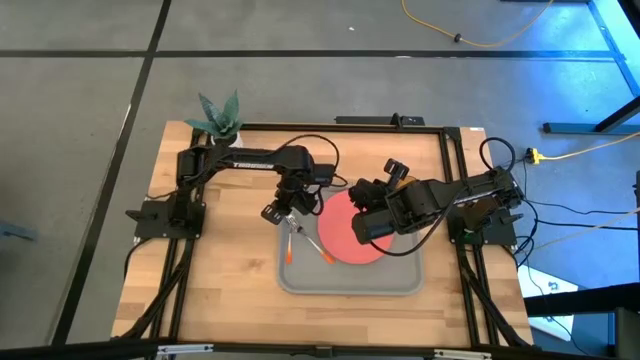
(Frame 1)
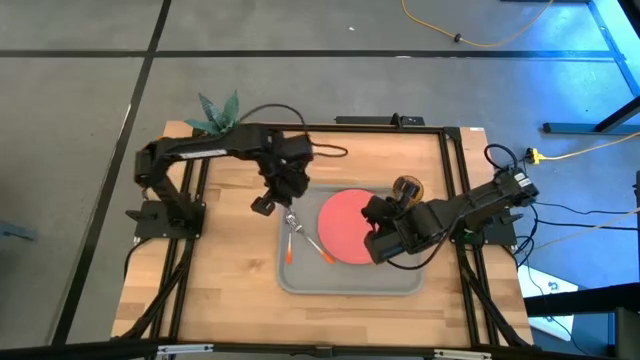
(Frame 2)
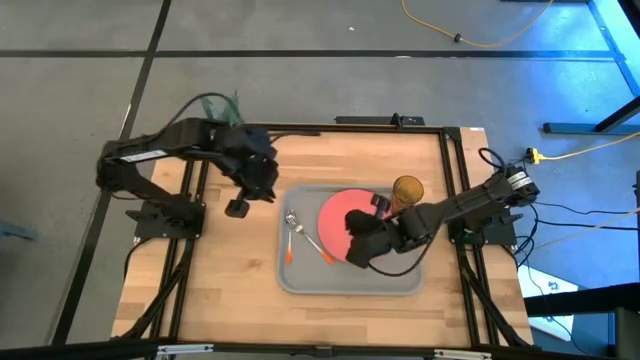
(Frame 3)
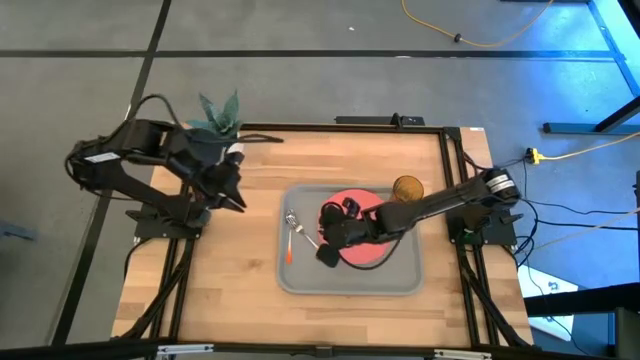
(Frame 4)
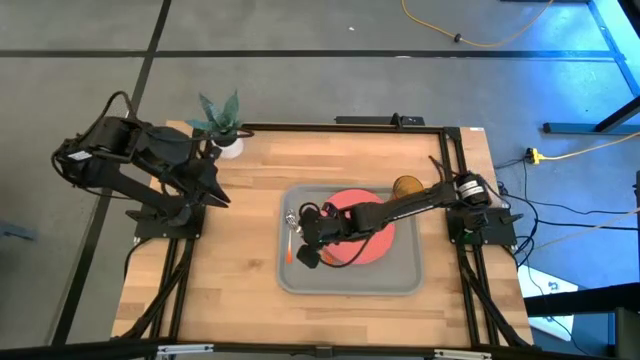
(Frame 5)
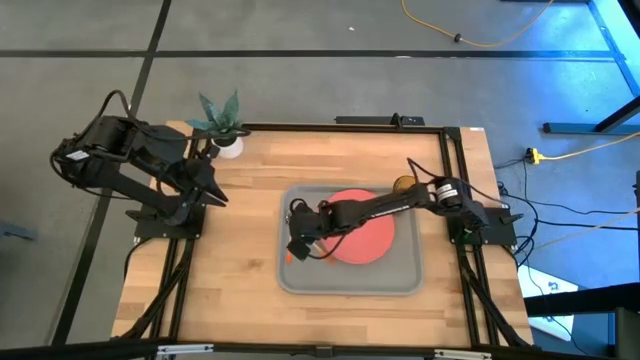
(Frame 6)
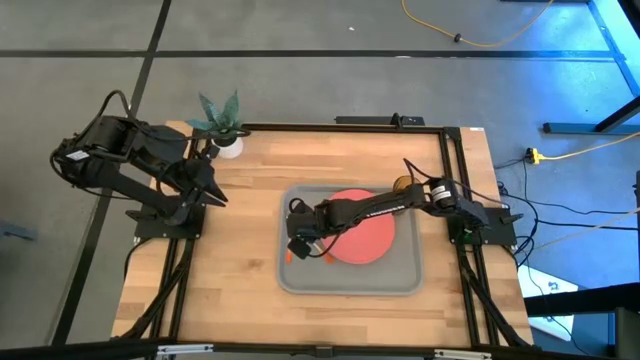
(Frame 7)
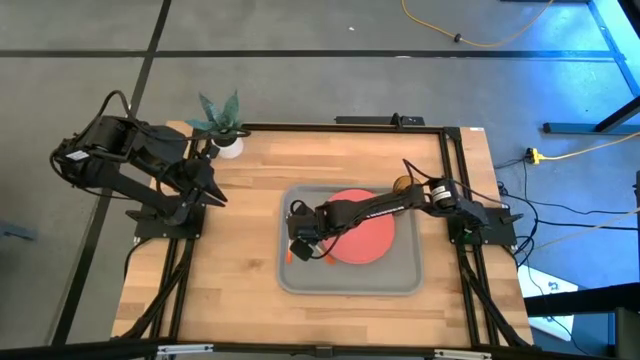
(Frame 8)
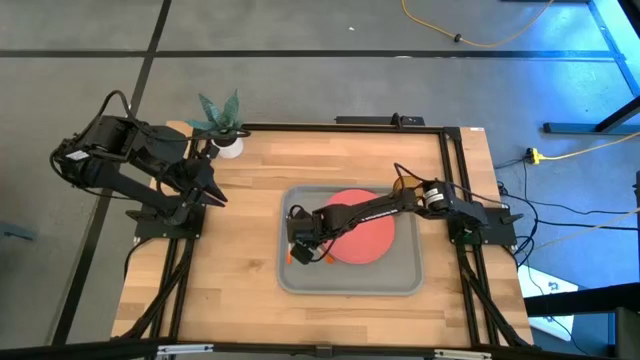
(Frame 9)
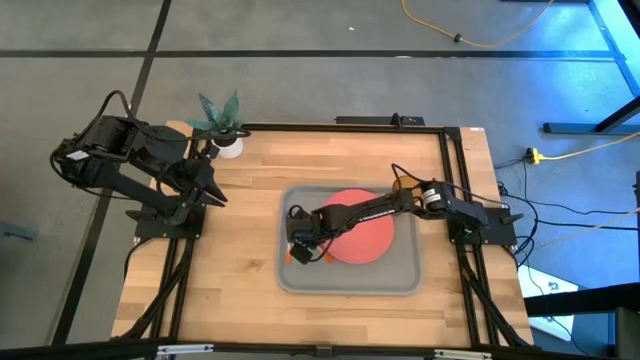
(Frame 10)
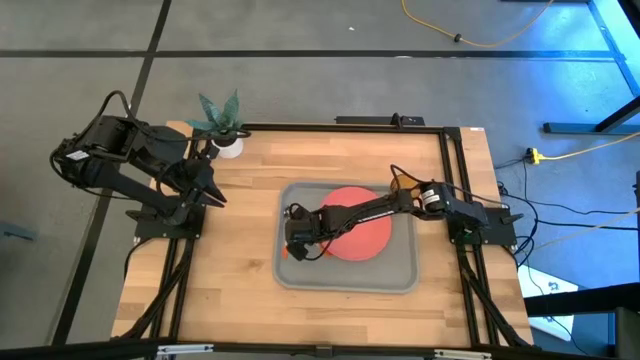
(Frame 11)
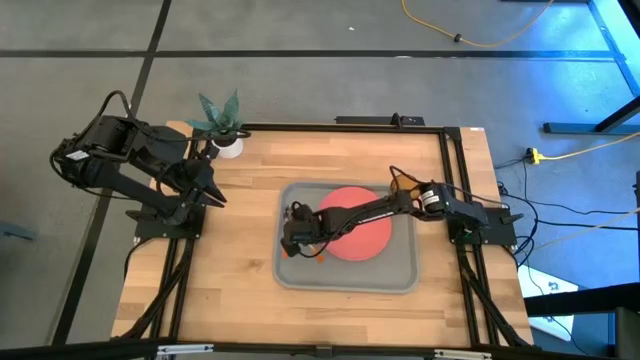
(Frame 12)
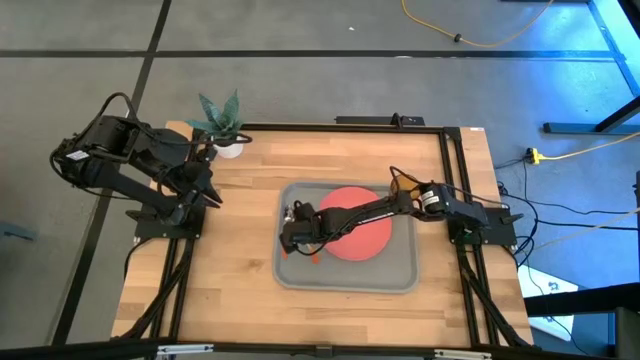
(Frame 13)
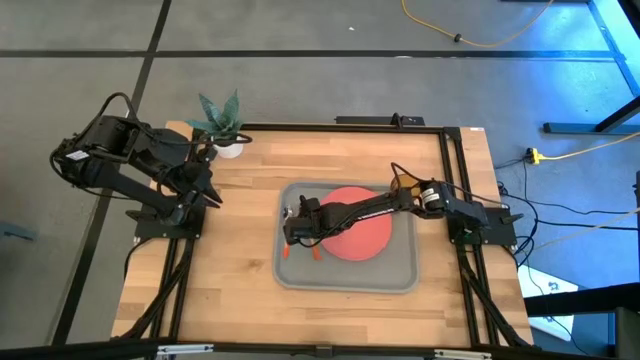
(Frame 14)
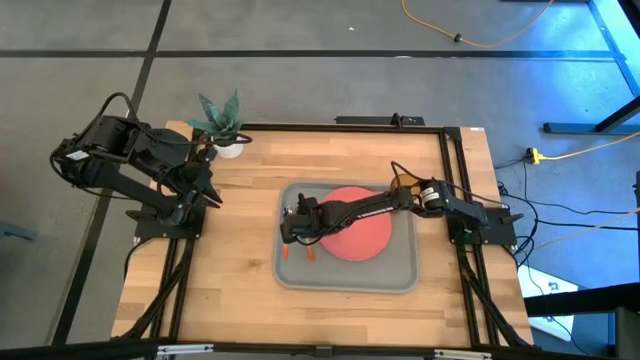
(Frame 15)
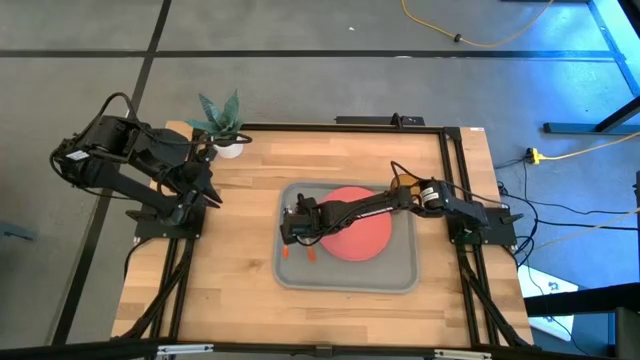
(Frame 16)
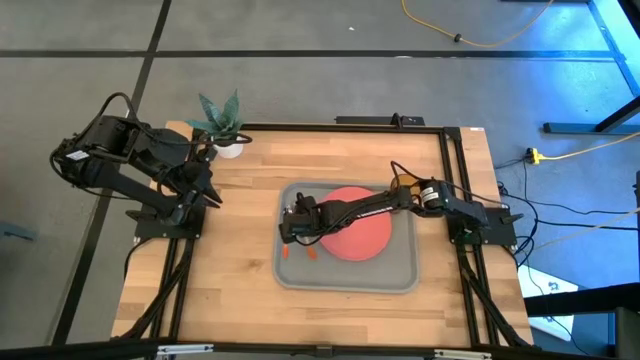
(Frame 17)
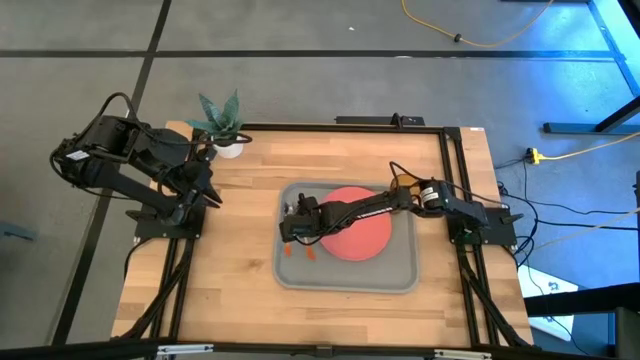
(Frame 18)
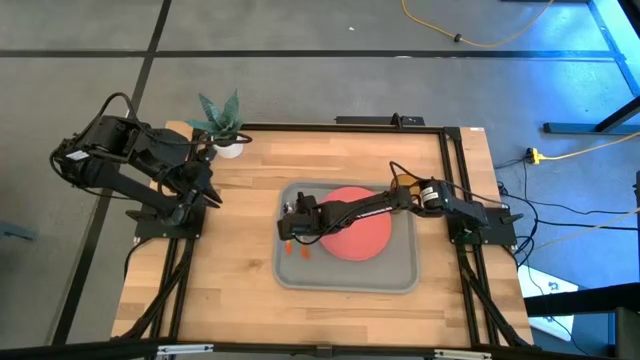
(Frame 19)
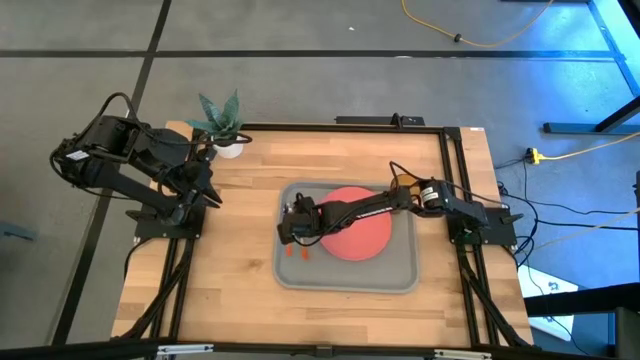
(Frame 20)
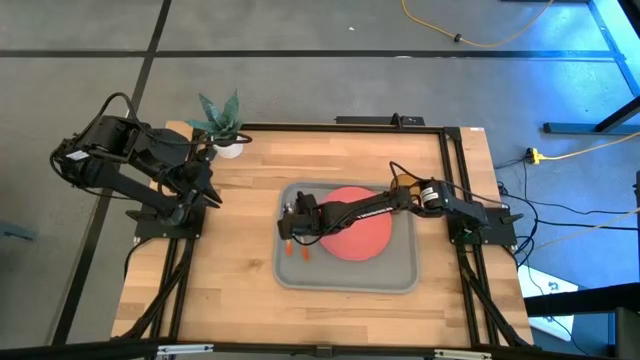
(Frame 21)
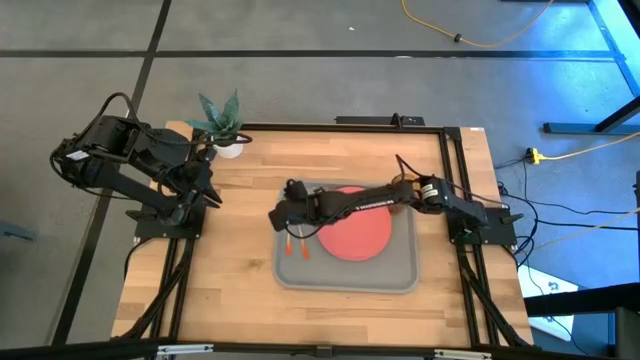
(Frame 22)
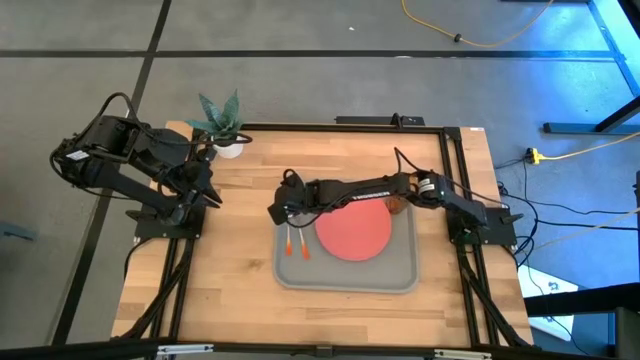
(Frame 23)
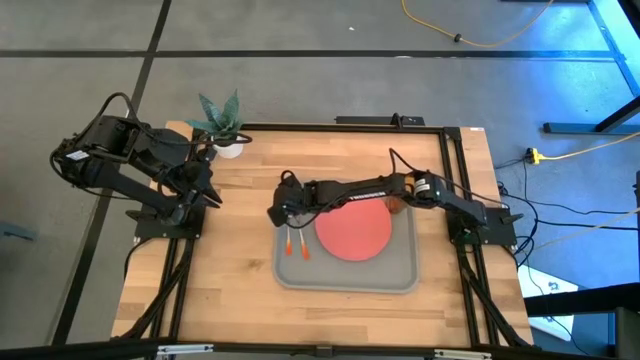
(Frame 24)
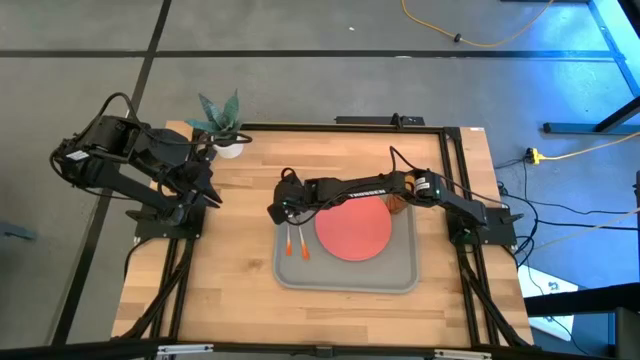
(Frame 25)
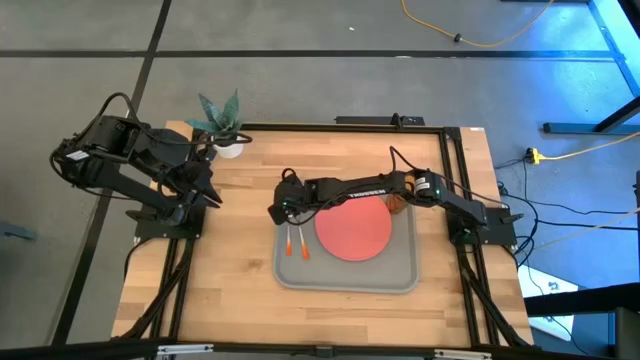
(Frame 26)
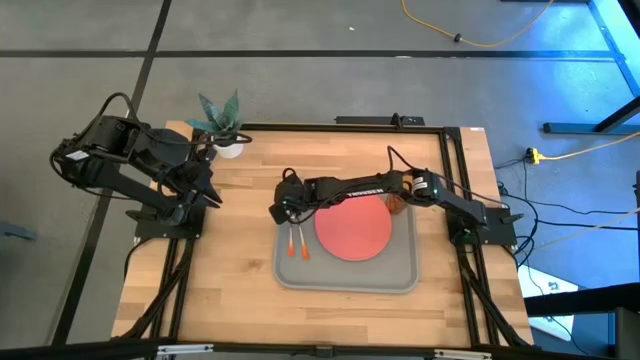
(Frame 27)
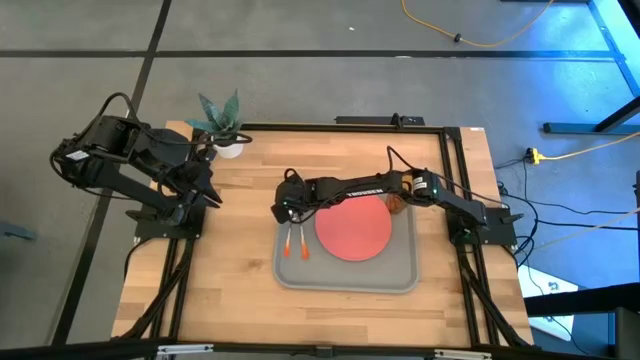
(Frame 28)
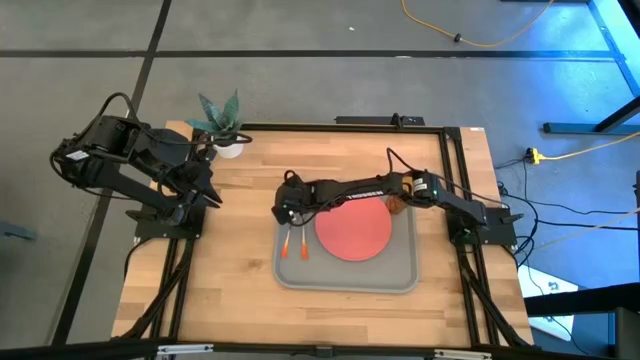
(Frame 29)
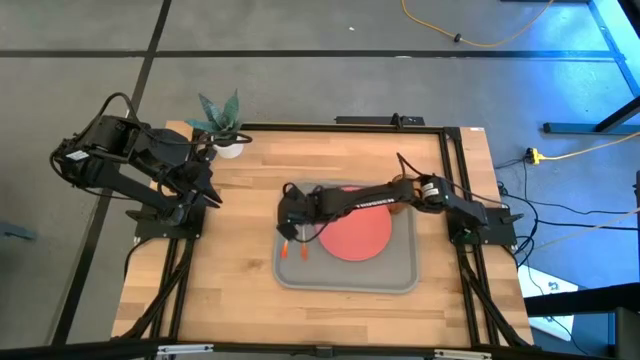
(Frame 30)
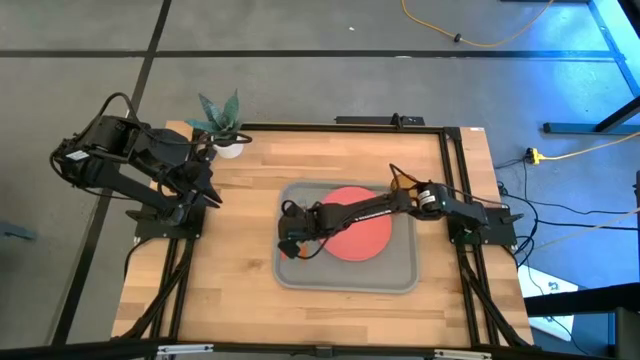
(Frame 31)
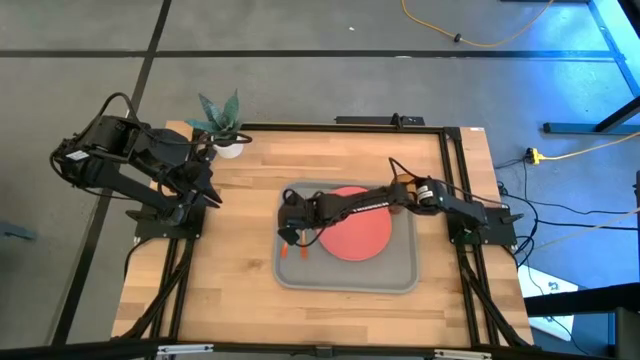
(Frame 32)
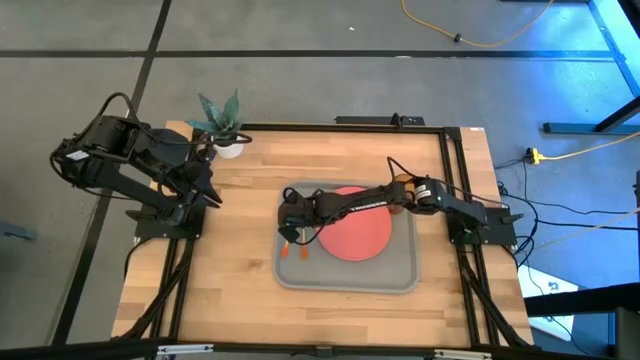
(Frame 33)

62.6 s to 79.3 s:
Task: Pick and place plate/cup/fork/spoon on tray
Adjust the orange fork

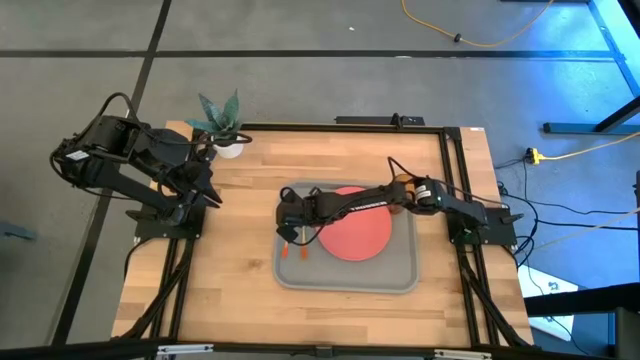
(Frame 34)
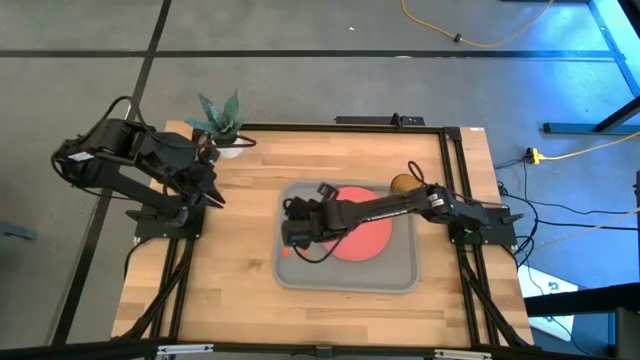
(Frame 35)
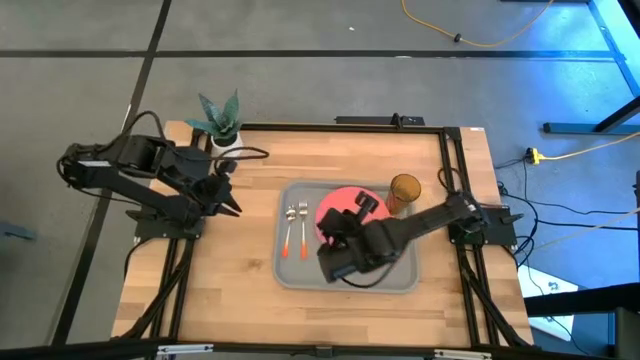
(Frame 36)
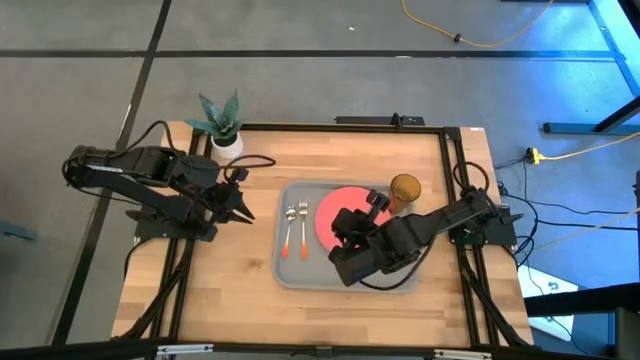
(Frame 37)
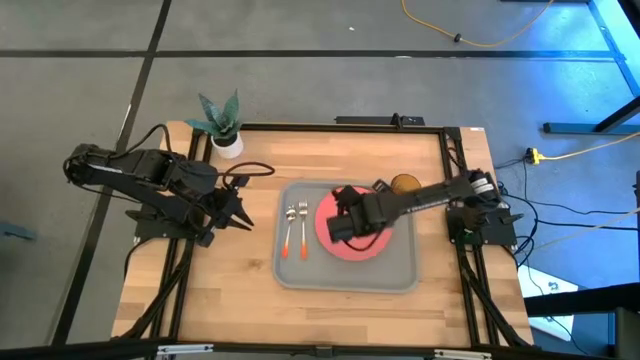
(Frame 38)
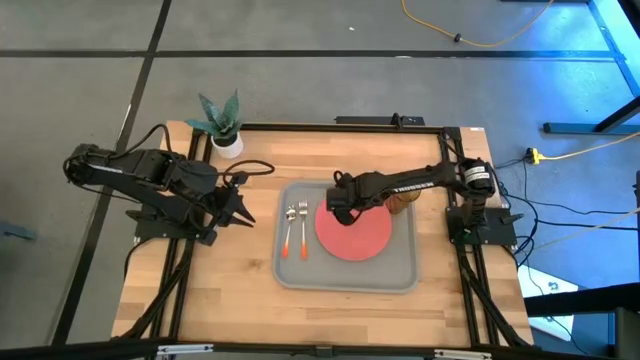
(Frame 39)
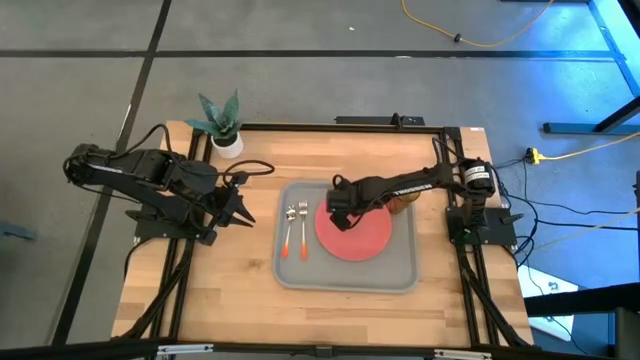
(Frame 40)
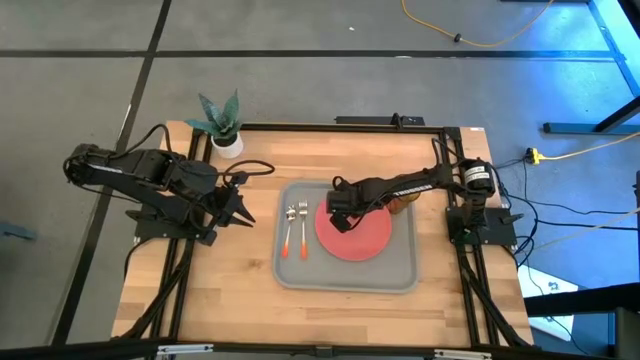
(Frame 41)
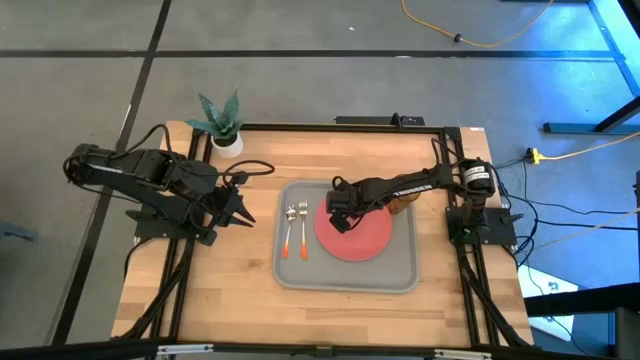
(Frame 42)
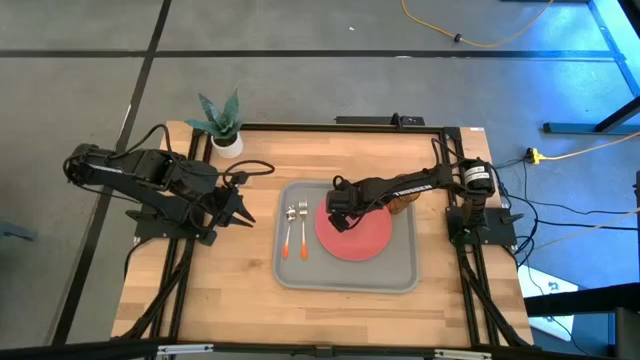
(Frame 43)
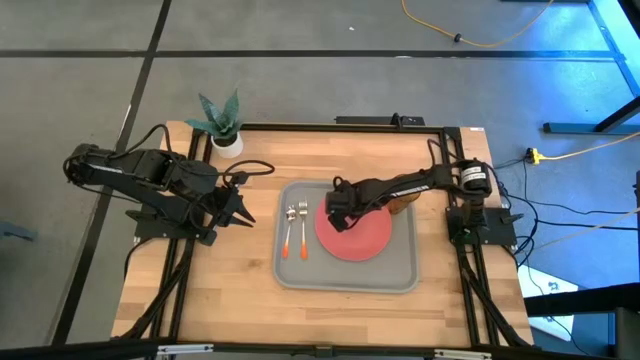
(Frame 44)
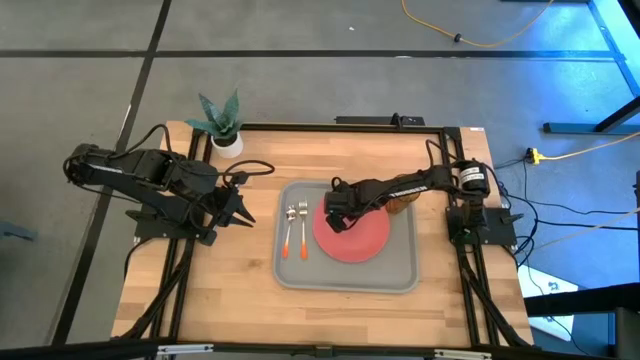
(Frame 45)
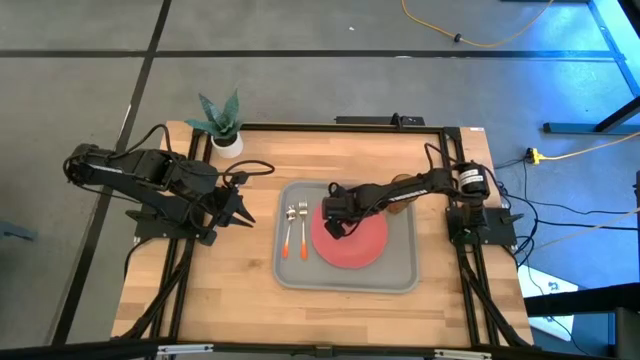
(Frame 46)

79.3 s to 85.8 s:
Adjust the pink plate
